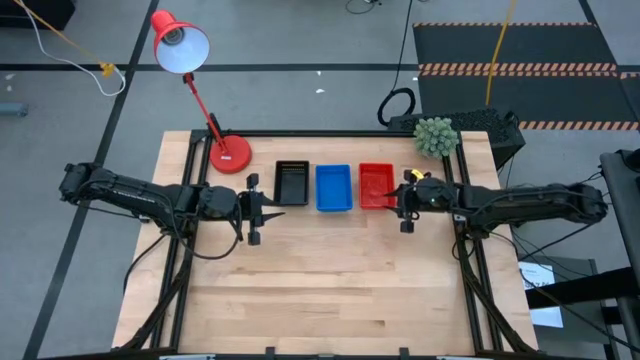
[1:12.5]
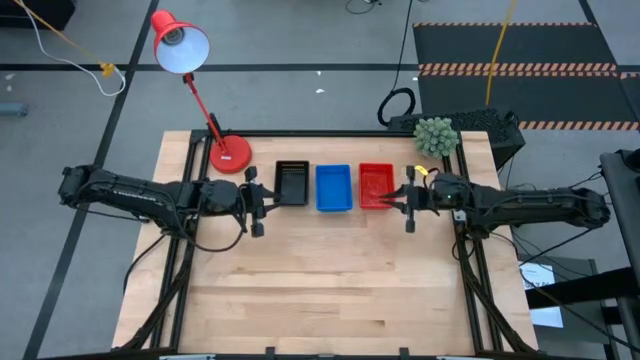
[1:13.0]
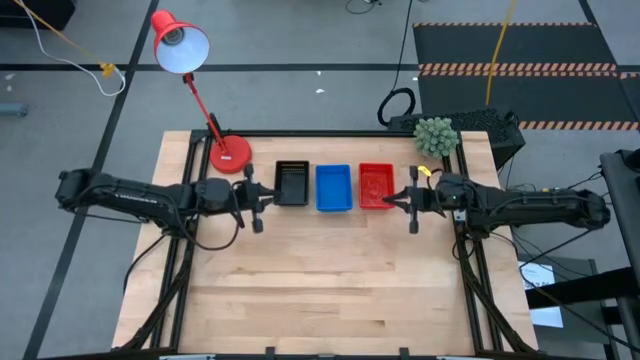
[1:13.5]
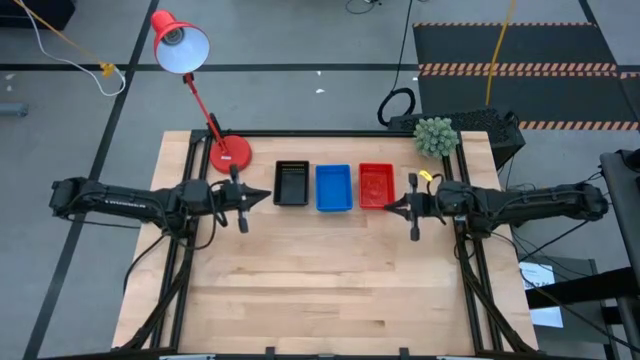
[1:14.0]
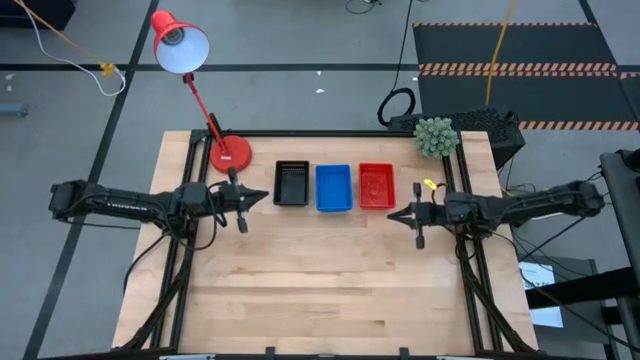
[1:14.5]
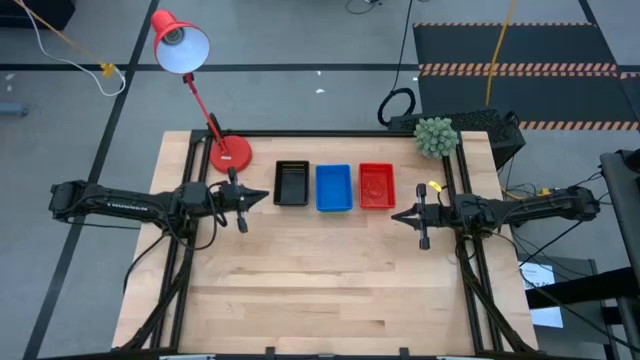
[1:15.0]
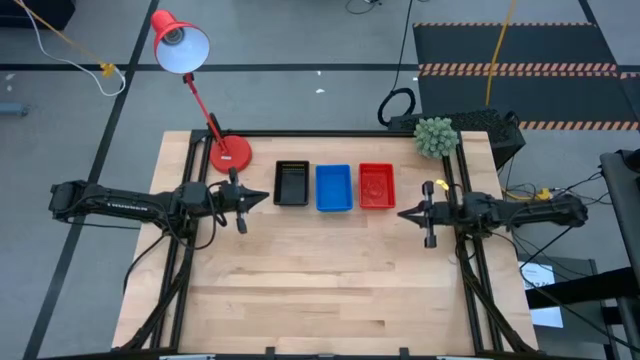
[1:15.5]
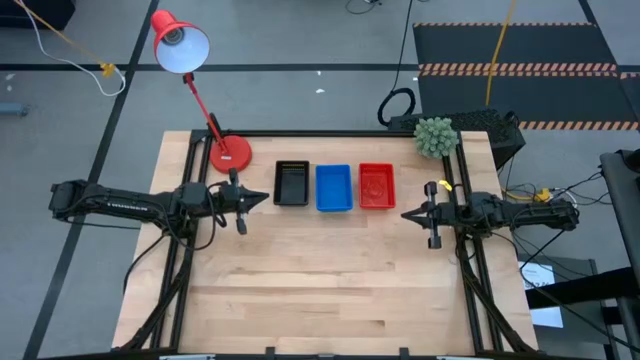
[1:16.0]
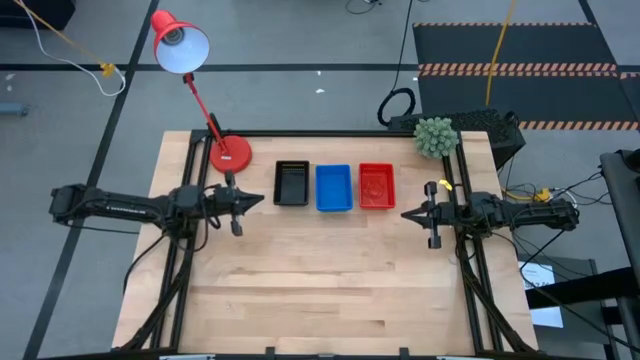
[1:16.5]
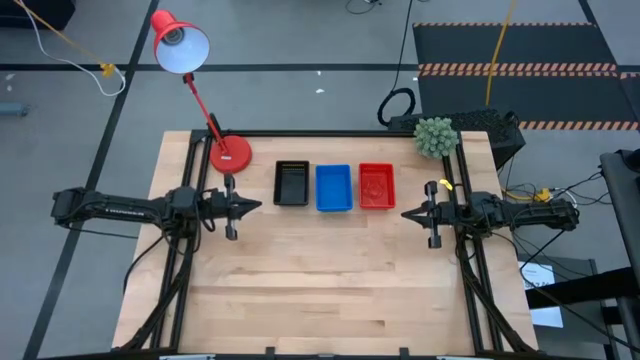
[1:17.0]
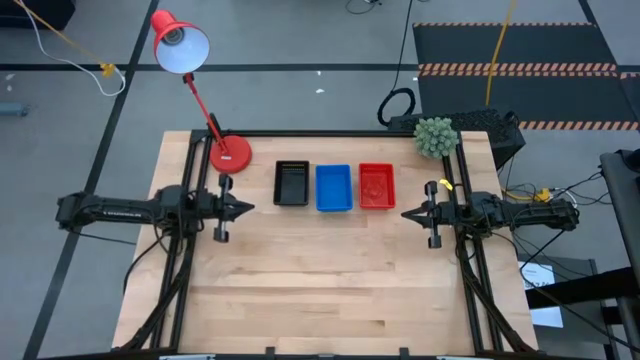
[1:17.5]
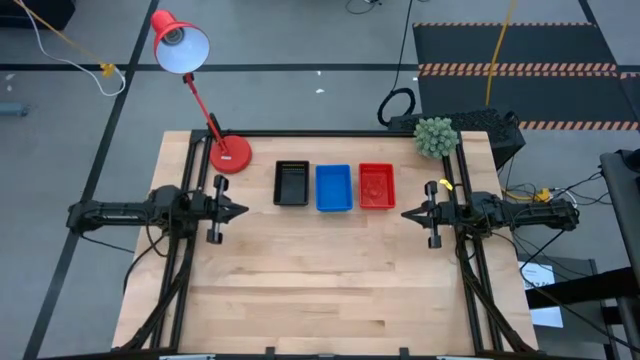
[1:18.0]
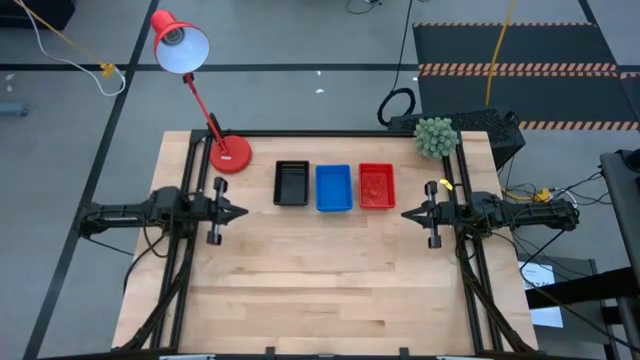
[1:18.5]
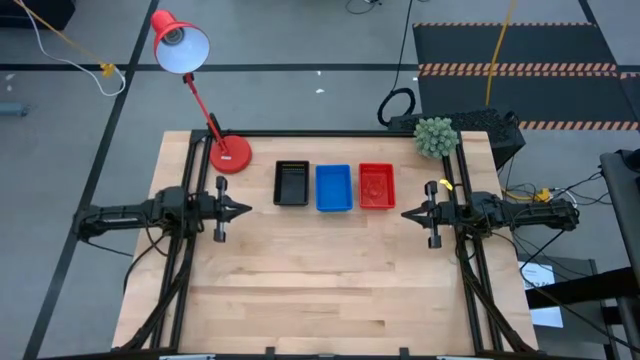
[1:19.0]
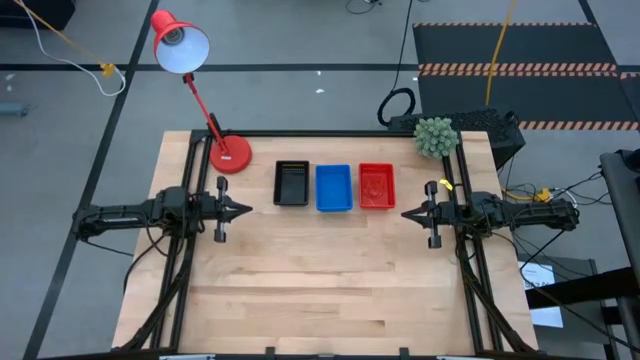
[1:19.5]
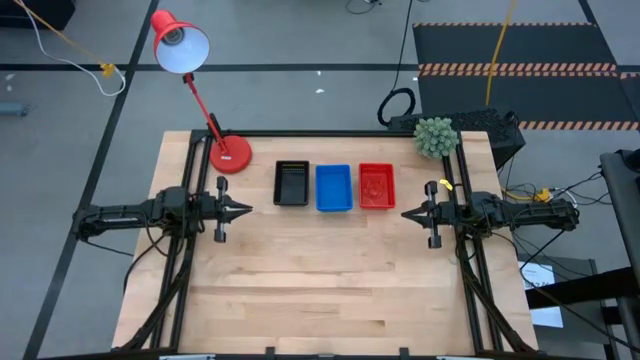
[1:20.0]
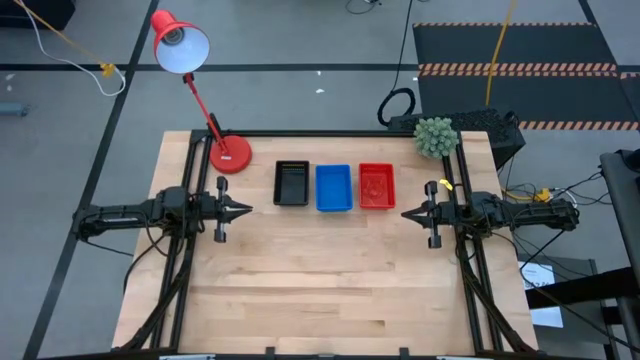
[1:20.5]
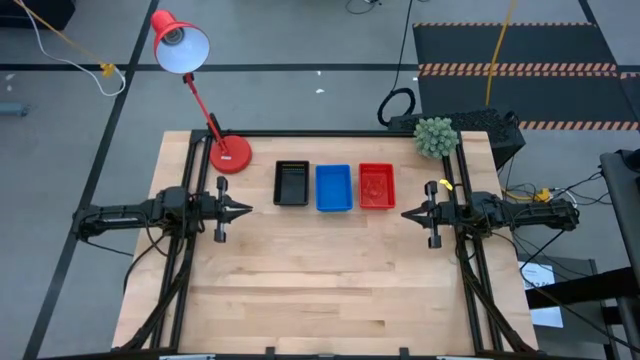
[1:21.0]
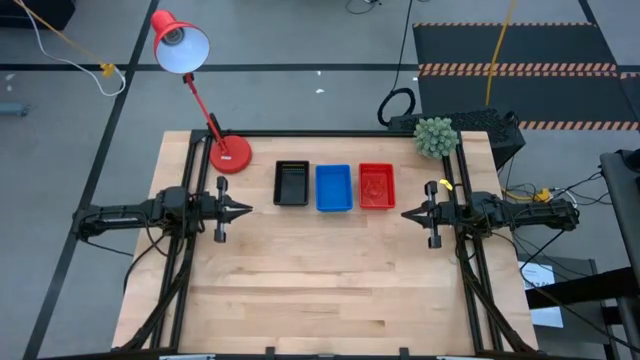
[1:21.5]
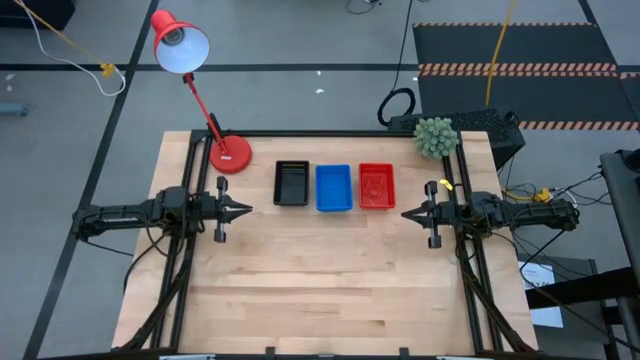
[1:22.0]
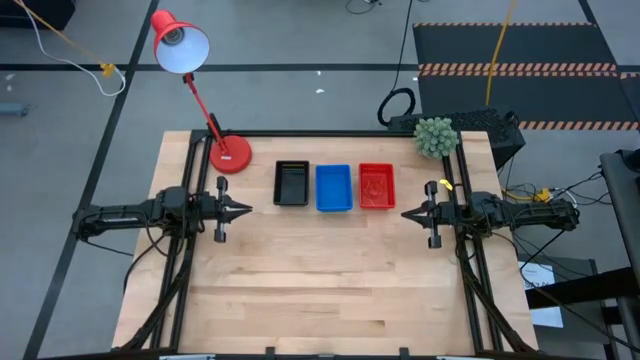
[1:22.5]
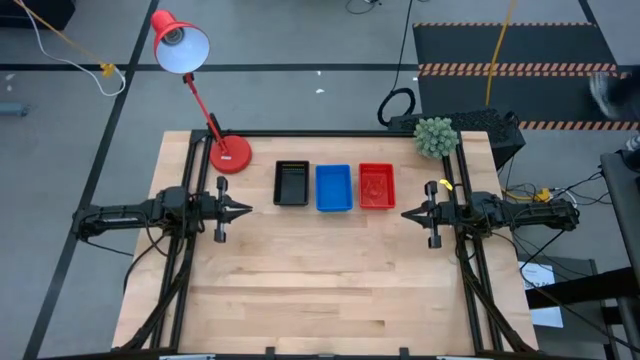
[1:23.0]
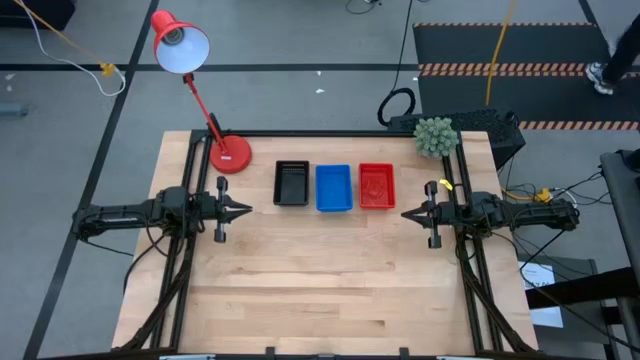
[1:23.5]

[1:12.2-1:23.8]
Return to Home Position

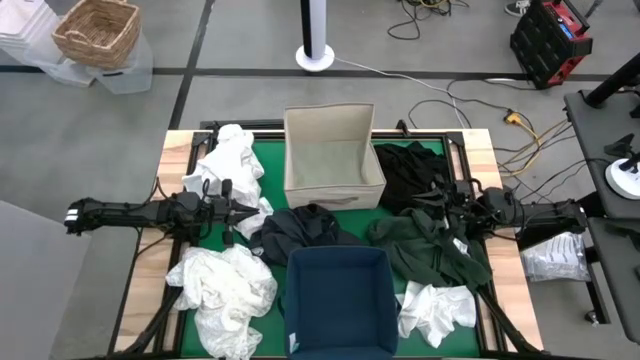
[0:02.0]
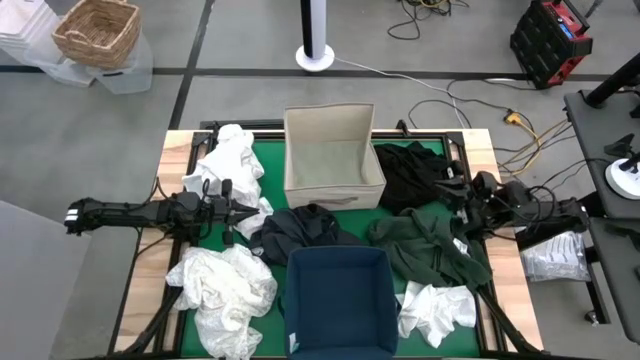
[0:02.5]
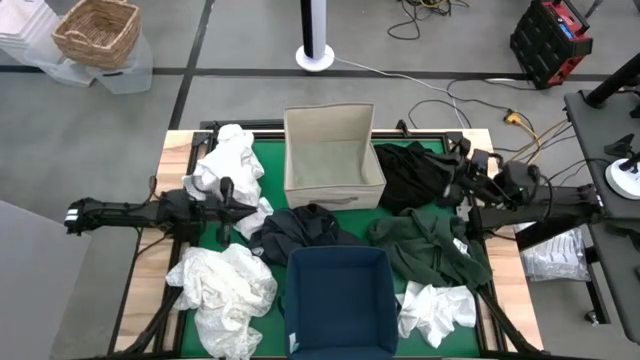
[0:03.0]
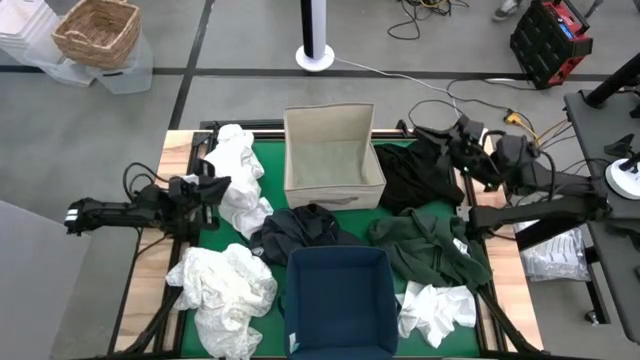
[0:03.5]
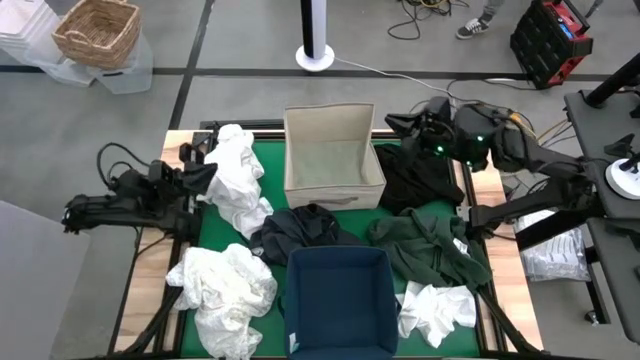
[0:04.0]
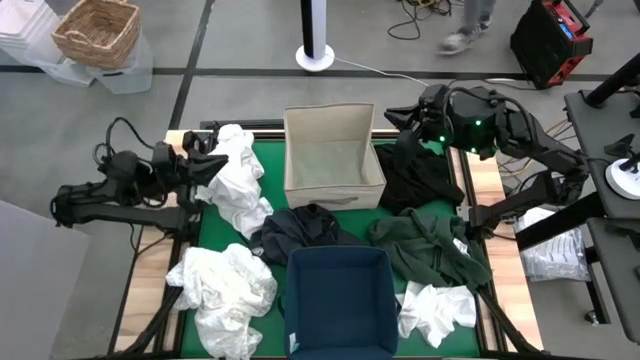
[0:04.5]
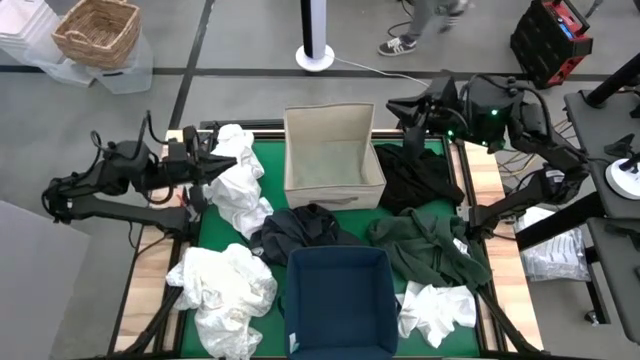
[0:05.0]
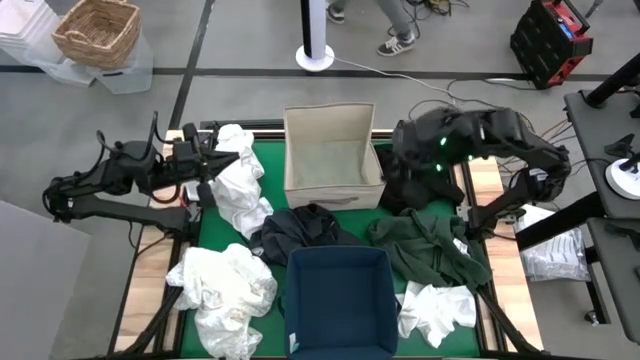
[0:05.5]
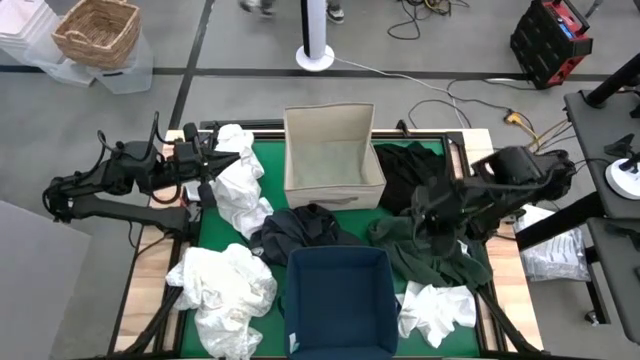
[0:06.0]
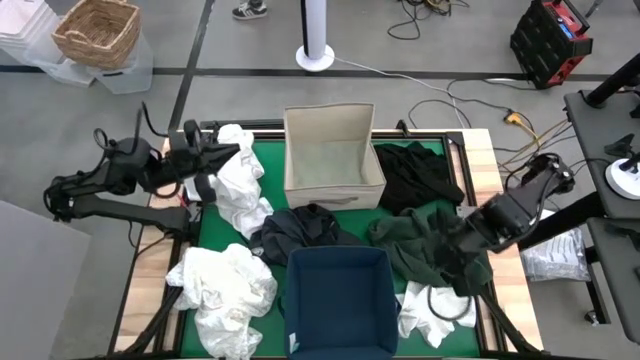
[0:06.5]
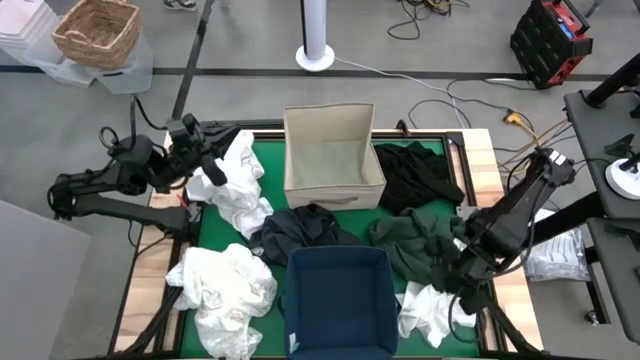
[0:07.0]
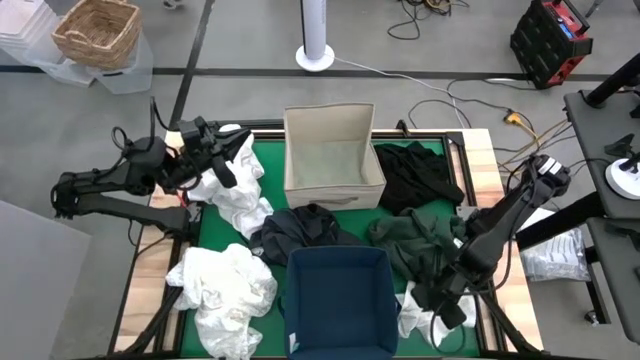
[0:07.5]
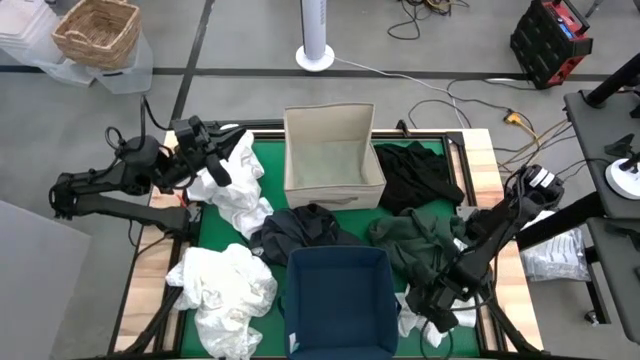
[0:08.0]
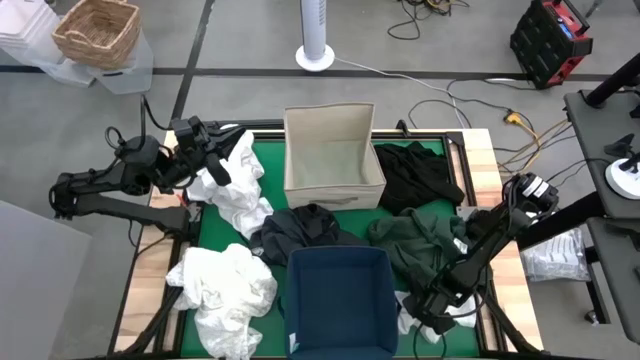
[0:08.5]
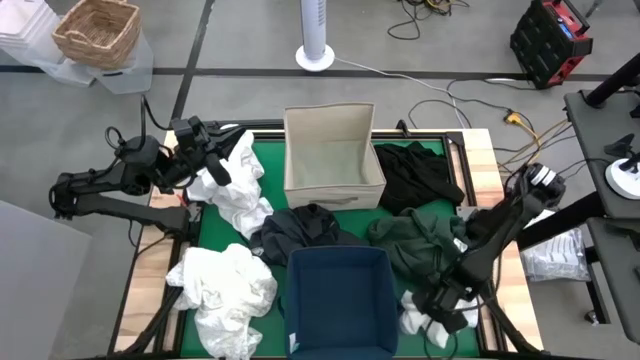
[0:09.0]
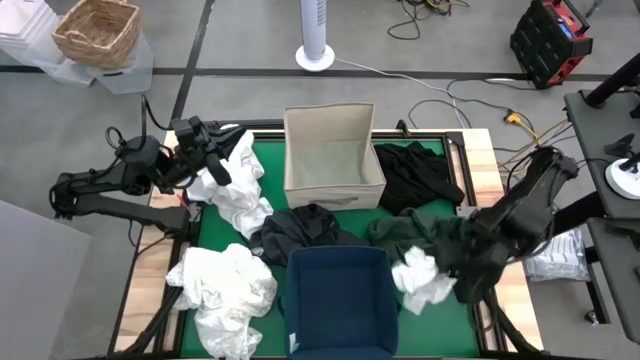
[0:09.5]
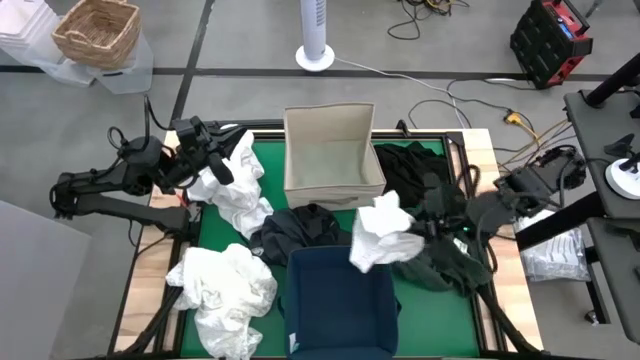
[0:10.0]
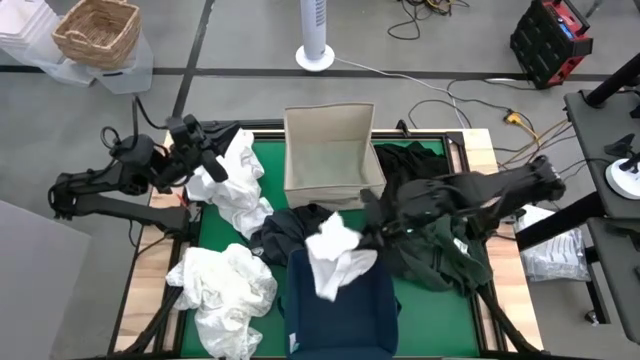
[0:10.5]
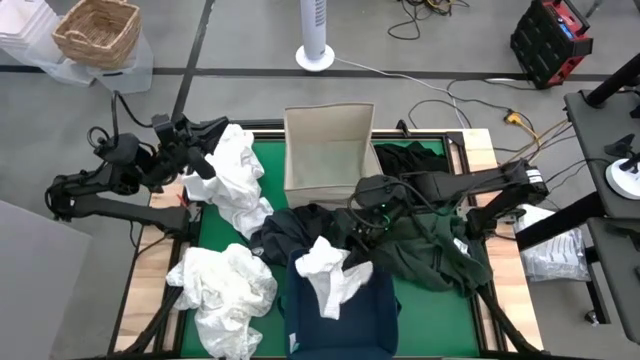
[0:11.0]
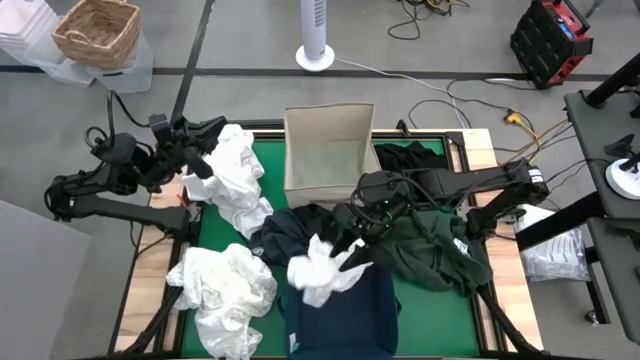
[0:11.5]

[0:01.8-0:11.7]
Put the white shirt into the white laundry bin
